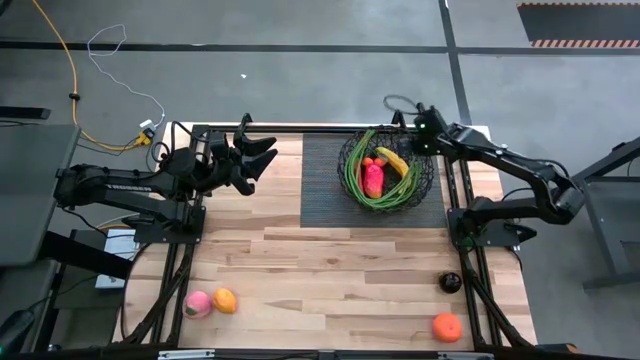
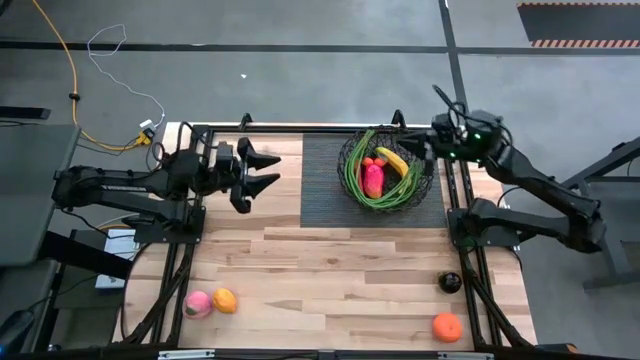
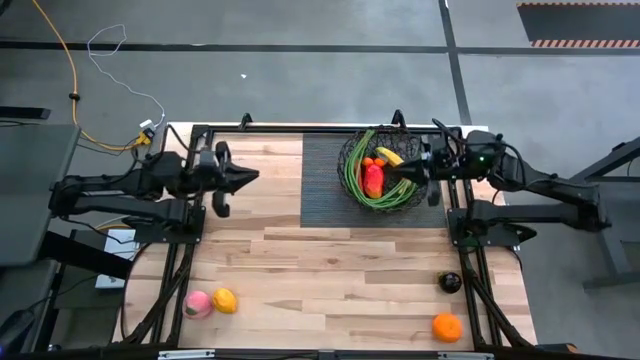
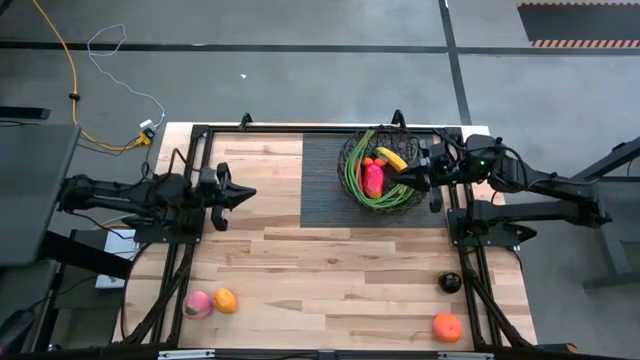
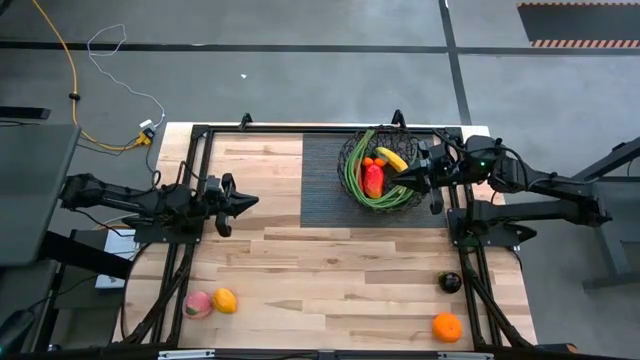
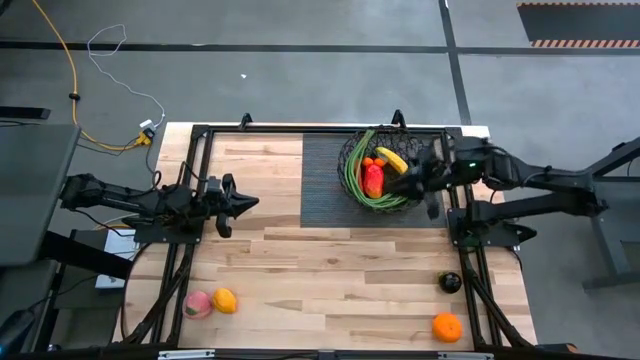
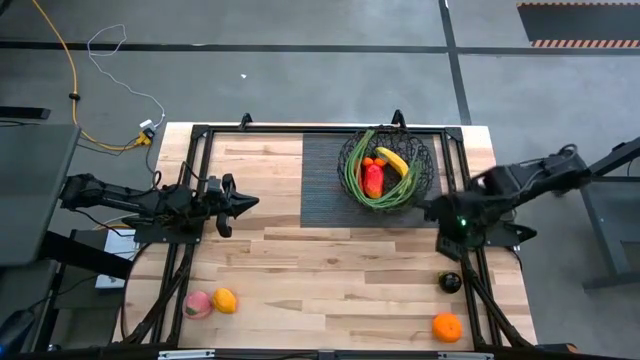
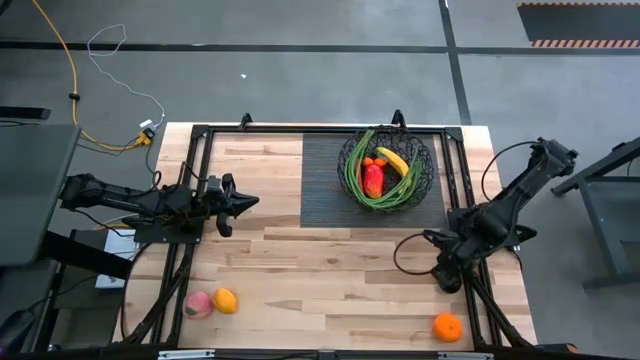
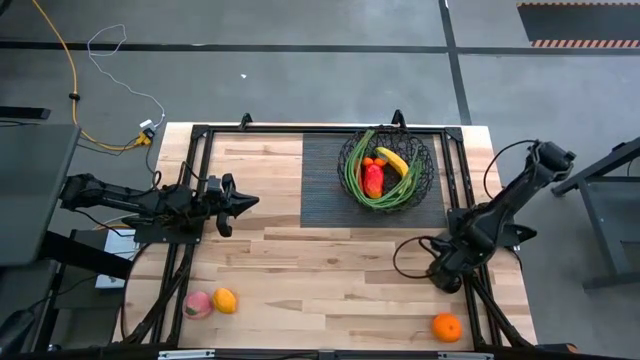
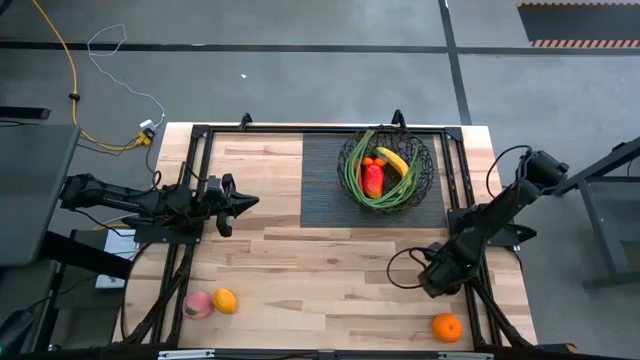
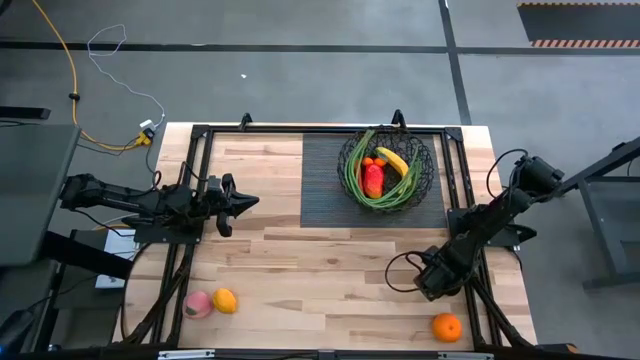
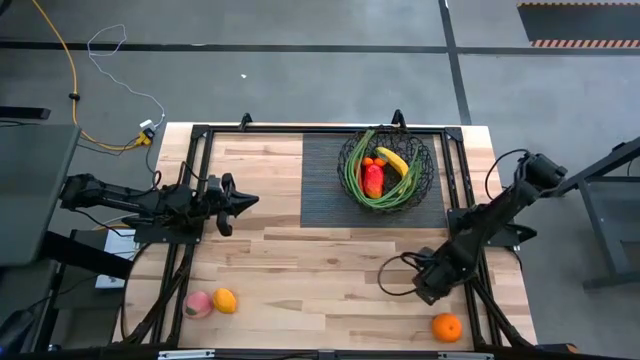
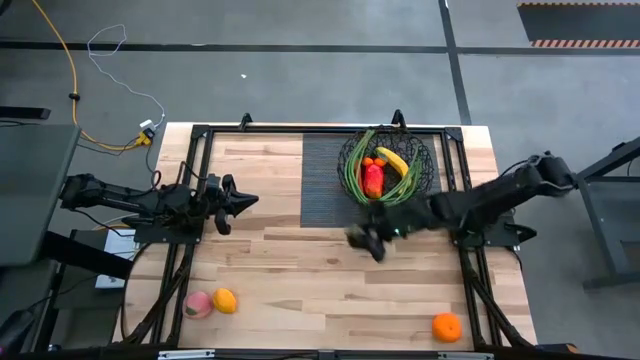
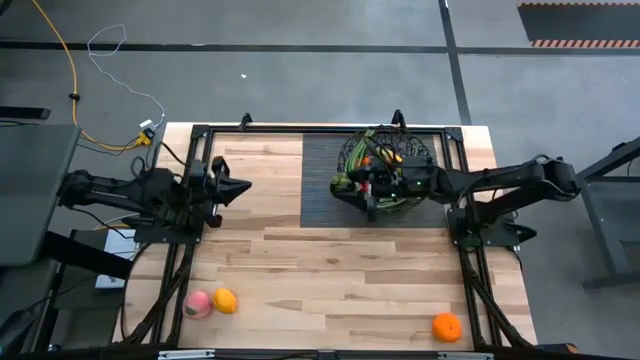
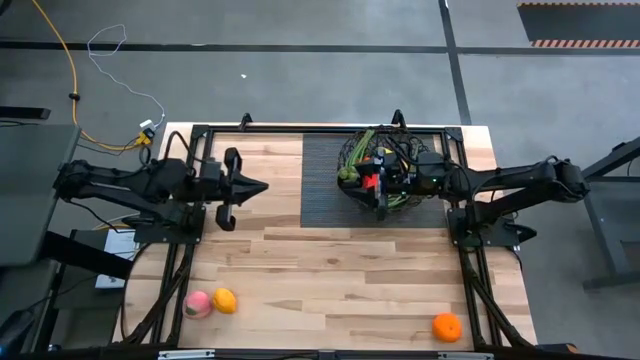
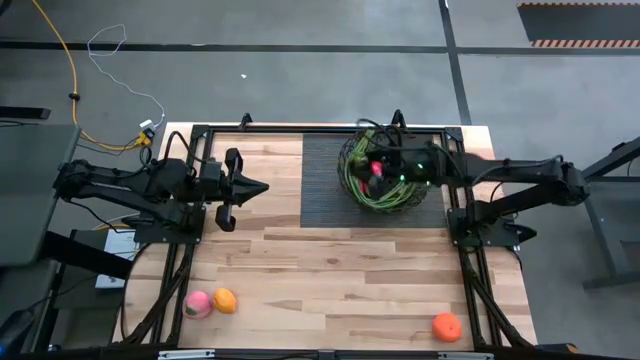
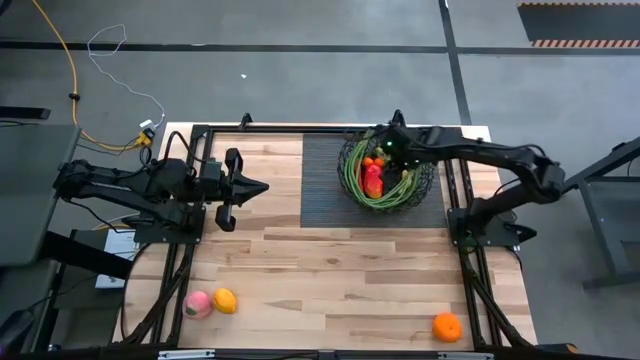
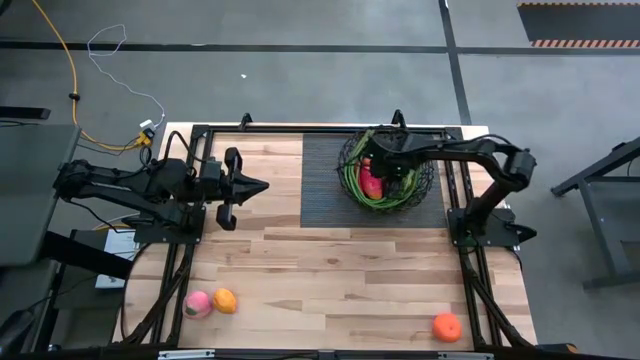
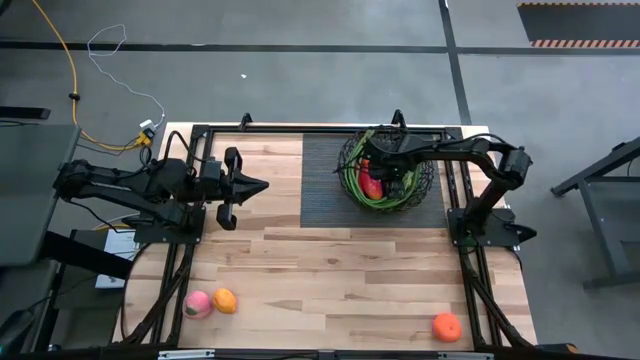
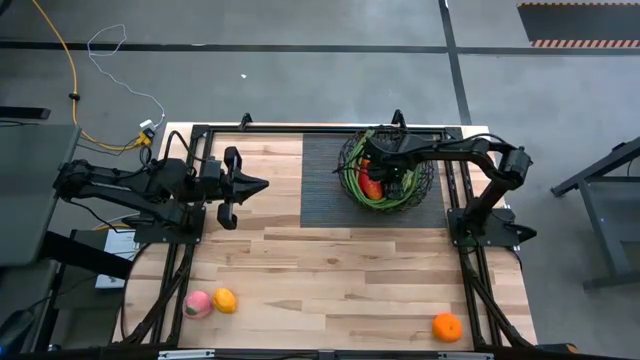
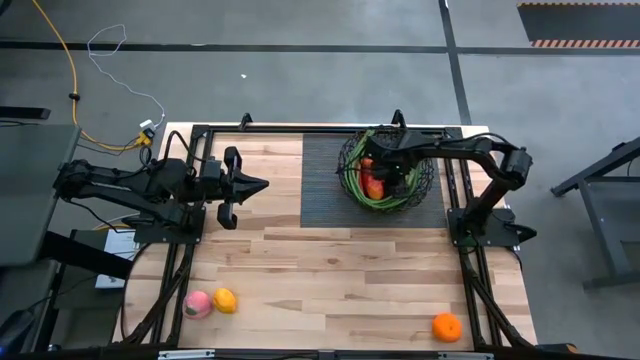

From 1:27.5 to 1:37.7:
Task: Build produce basket
Put the mangosteen into the black basket

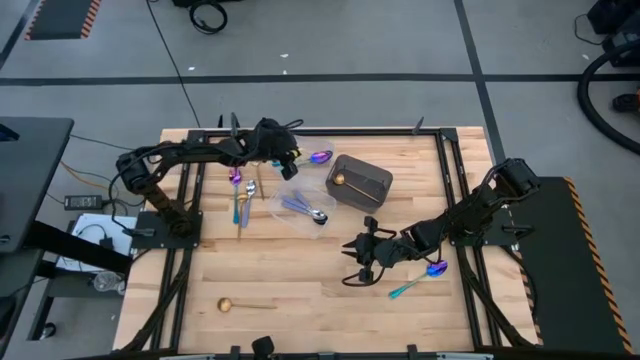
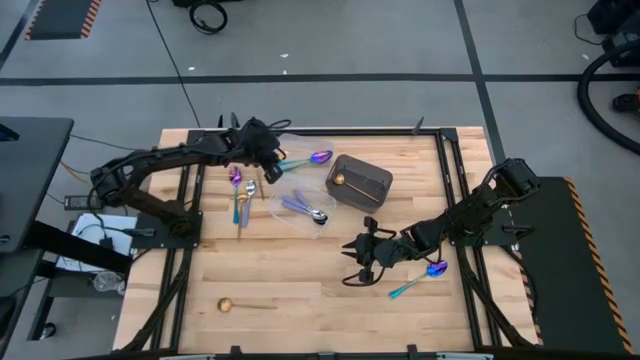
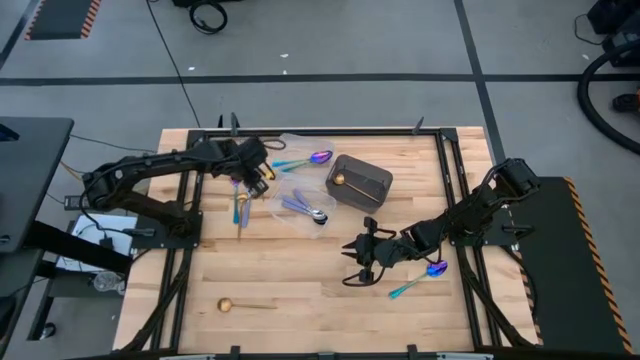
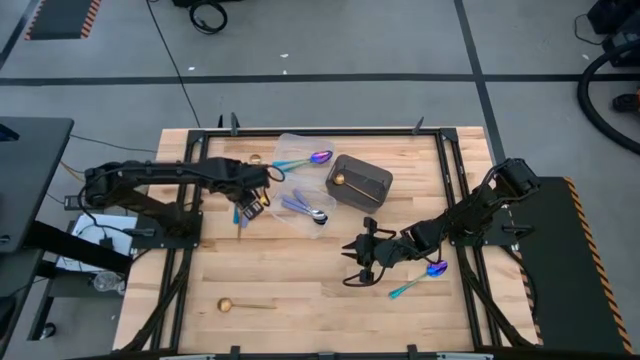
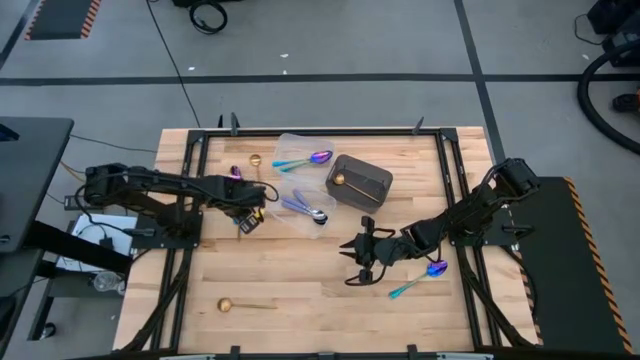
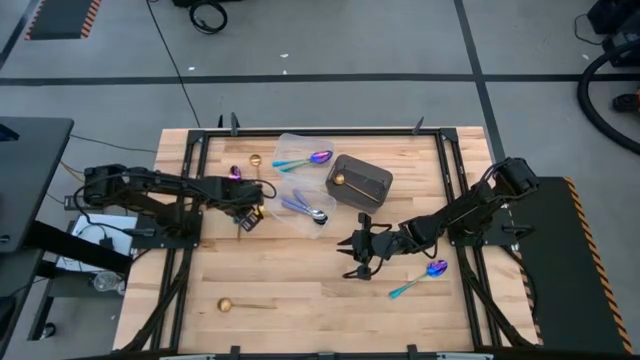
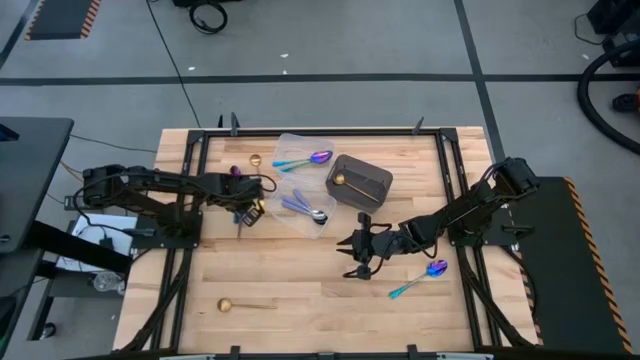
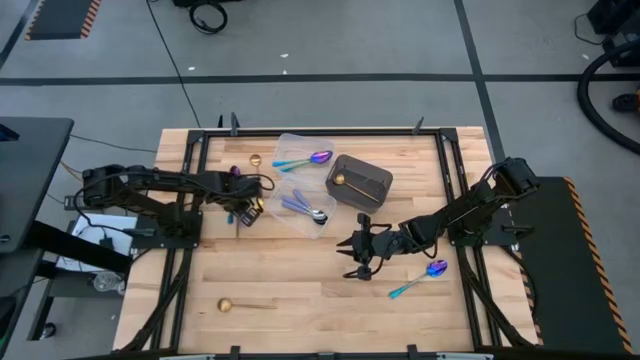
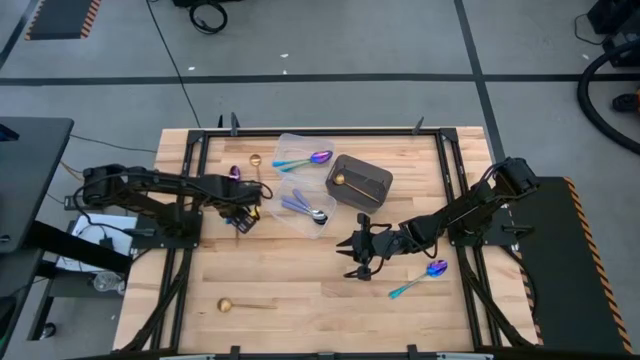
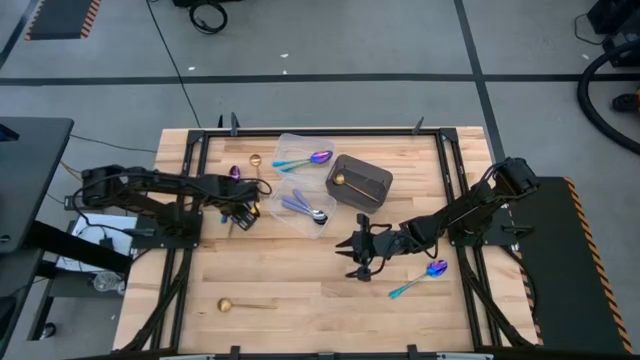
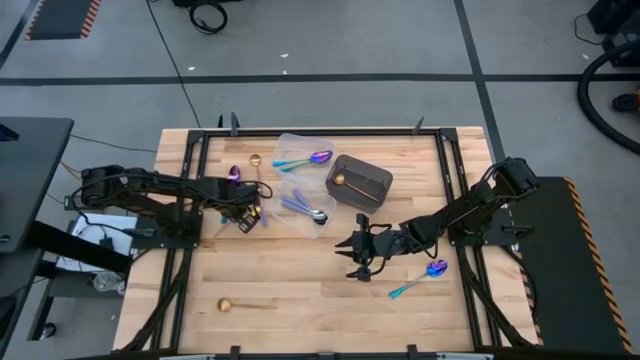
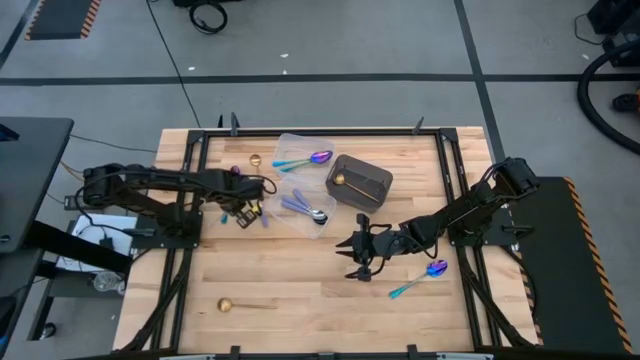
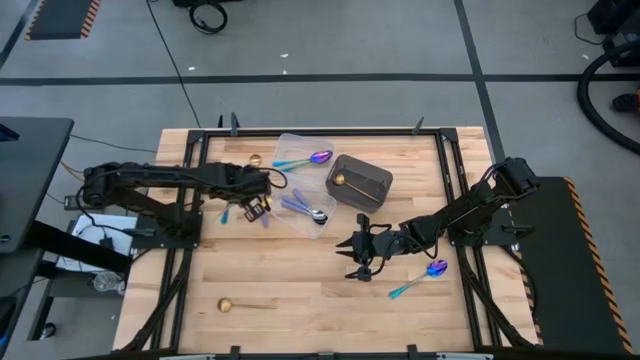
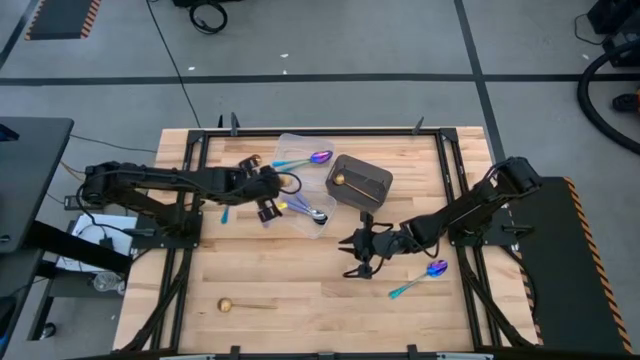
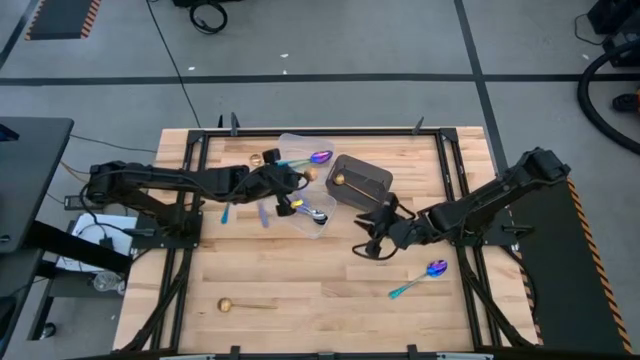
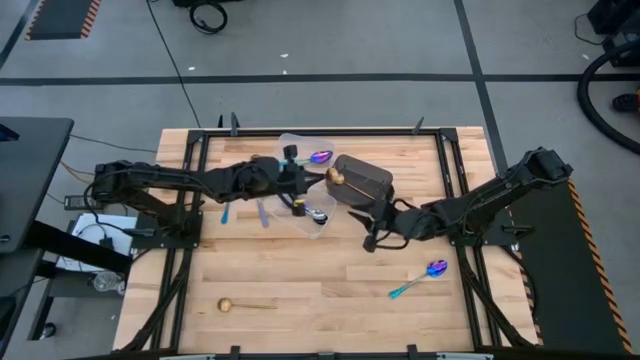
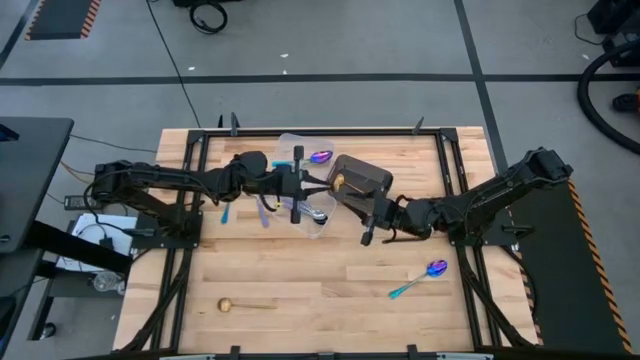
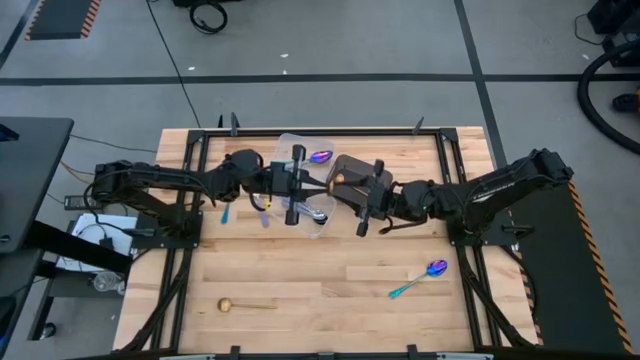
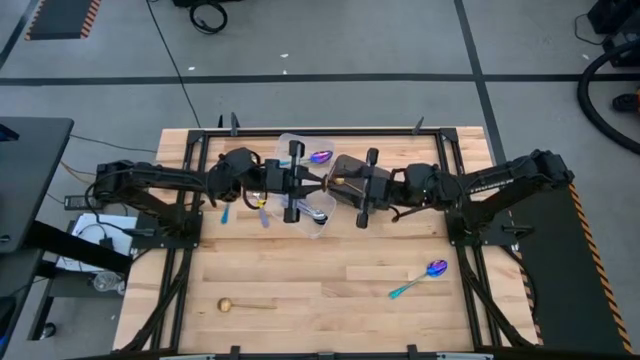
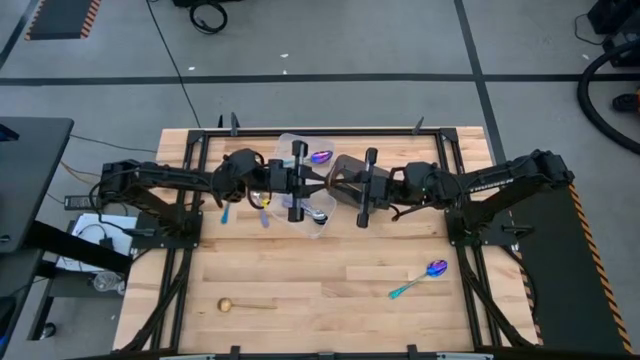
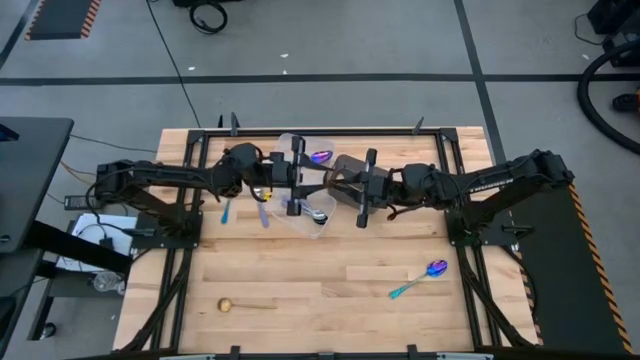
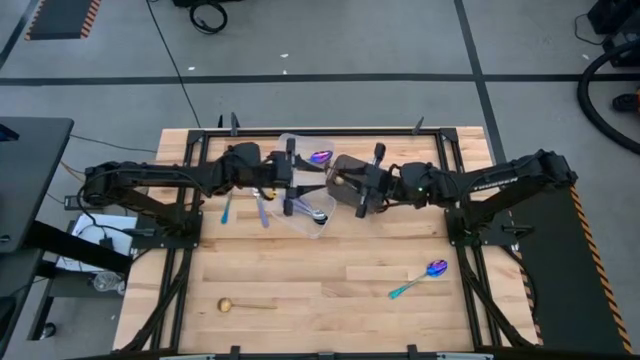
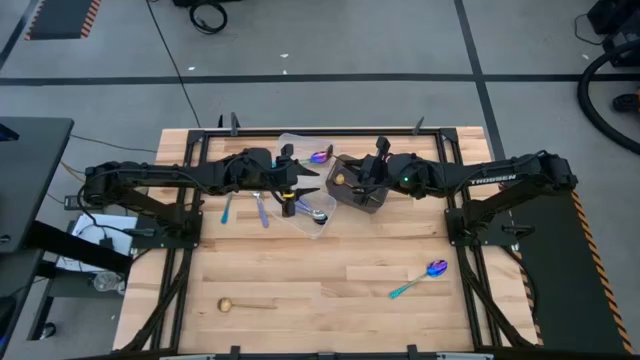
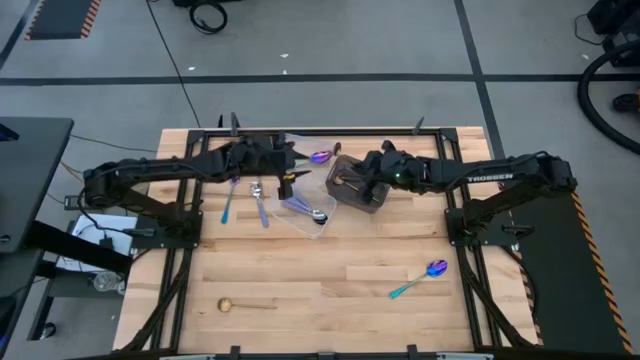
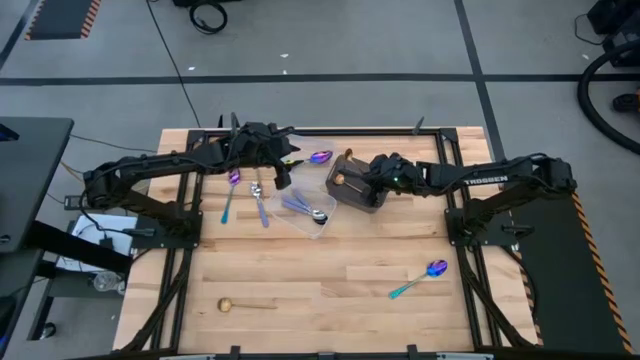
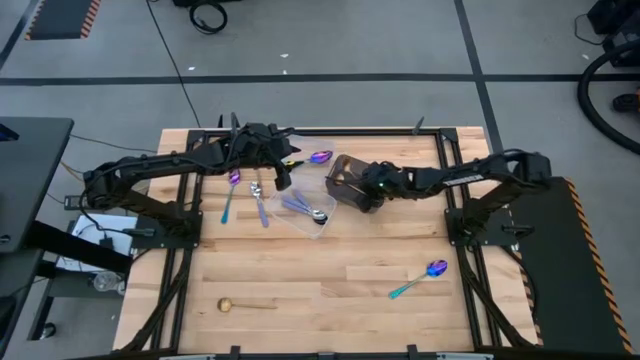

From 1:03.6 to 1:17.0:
Task: Sort silverware by color (type)
Put the gold spoon into the black bin
